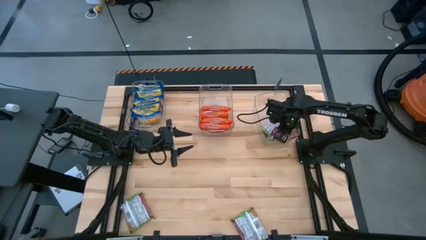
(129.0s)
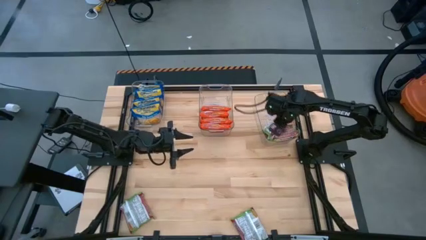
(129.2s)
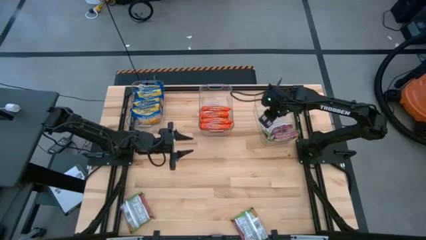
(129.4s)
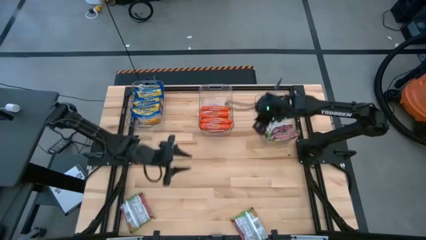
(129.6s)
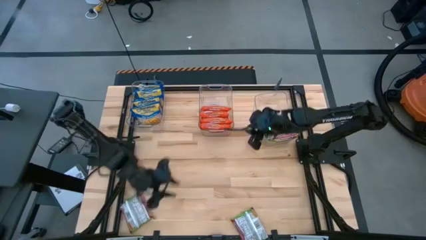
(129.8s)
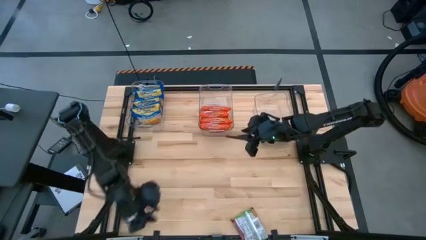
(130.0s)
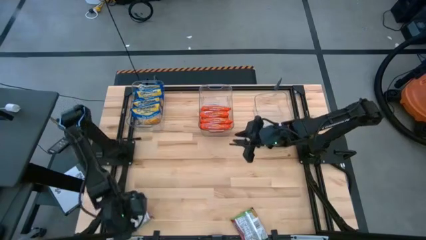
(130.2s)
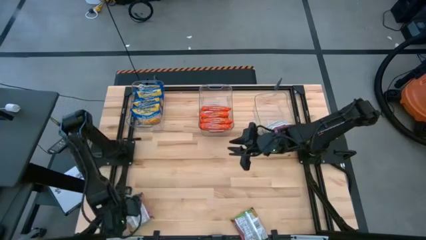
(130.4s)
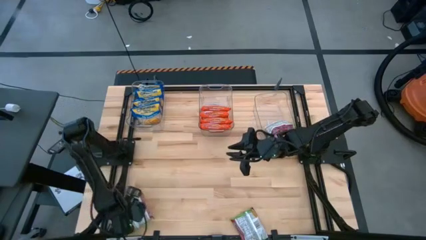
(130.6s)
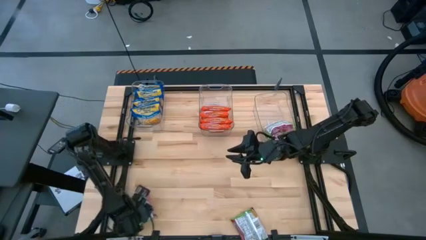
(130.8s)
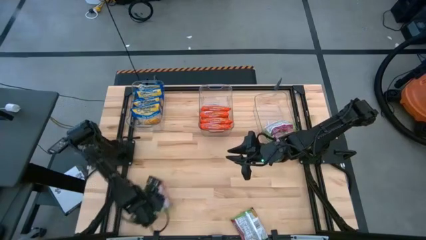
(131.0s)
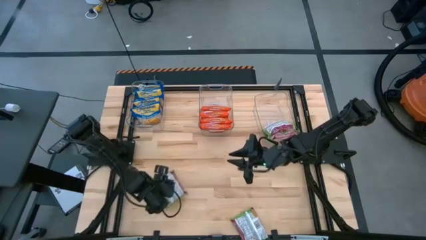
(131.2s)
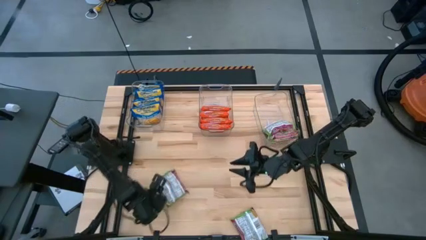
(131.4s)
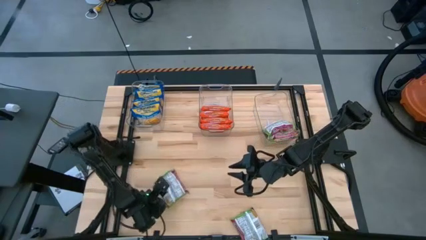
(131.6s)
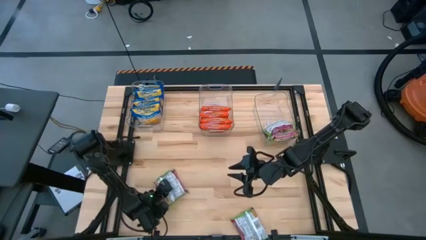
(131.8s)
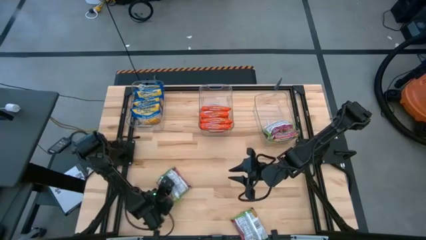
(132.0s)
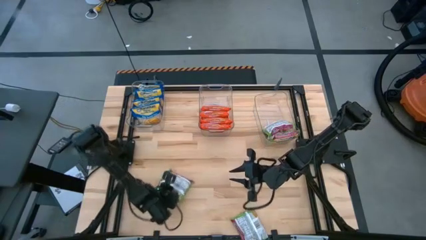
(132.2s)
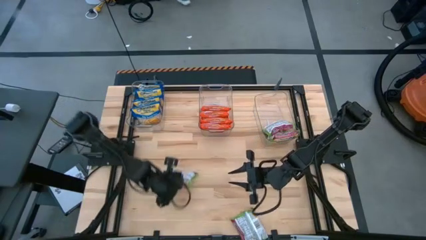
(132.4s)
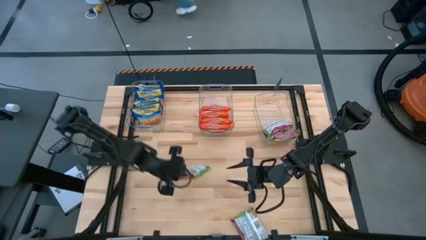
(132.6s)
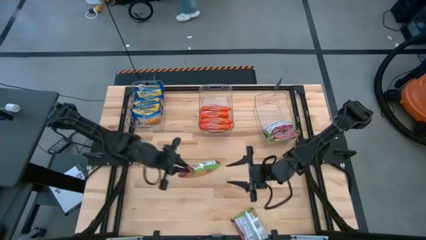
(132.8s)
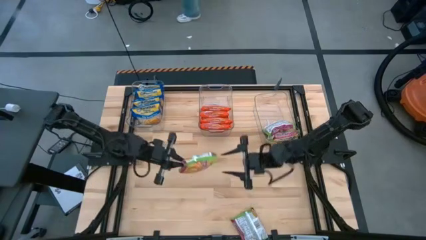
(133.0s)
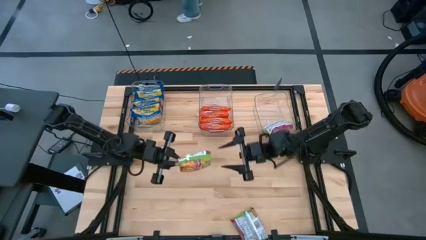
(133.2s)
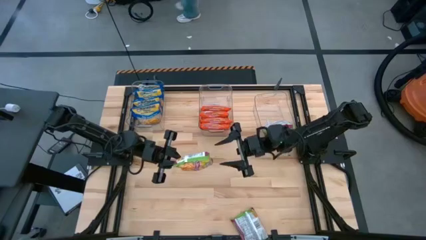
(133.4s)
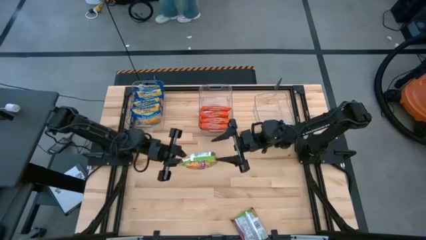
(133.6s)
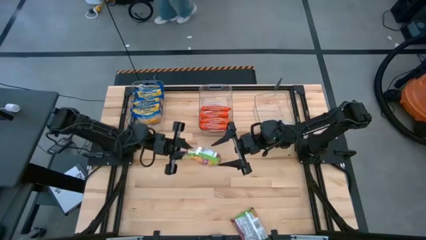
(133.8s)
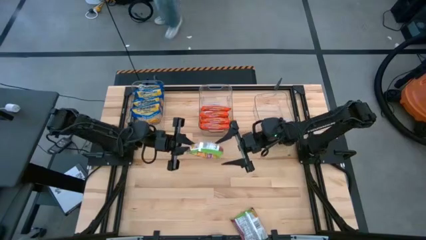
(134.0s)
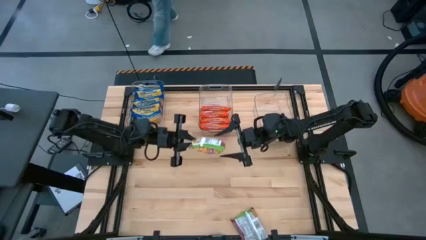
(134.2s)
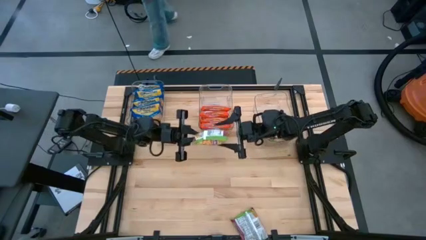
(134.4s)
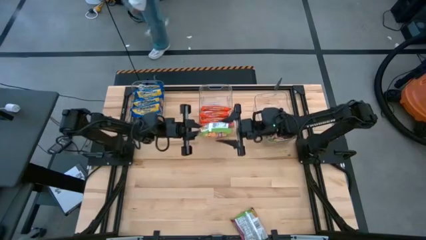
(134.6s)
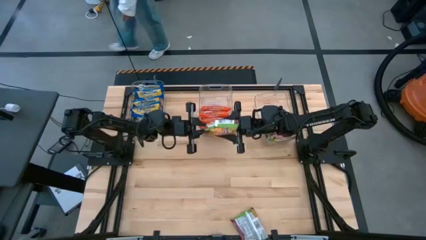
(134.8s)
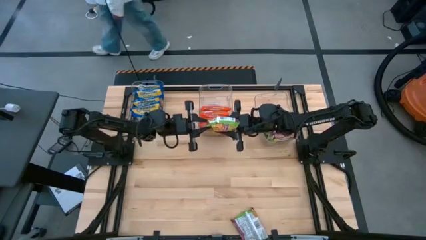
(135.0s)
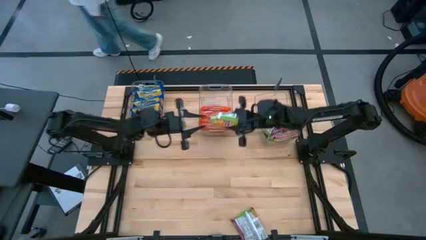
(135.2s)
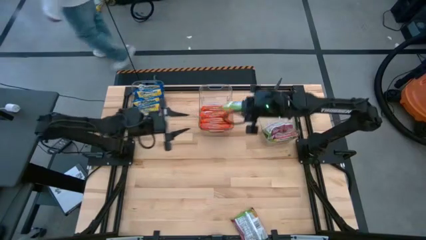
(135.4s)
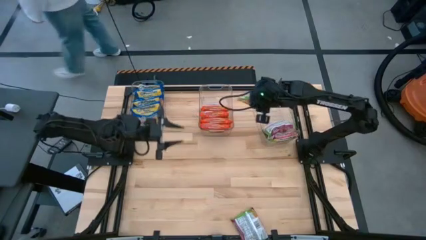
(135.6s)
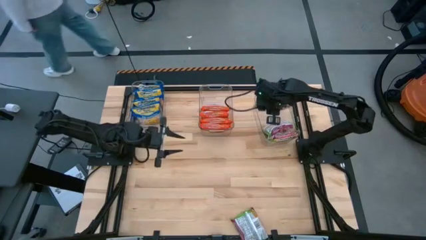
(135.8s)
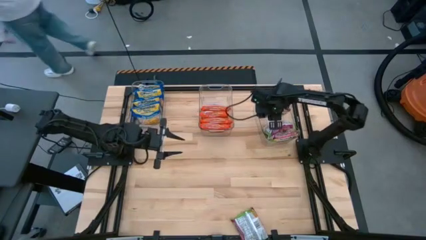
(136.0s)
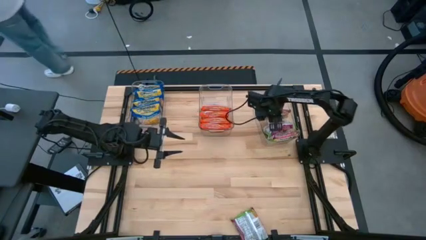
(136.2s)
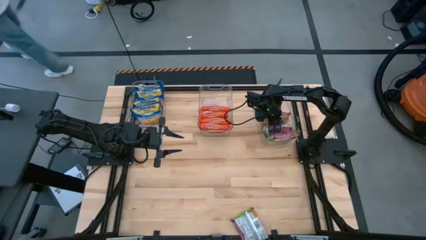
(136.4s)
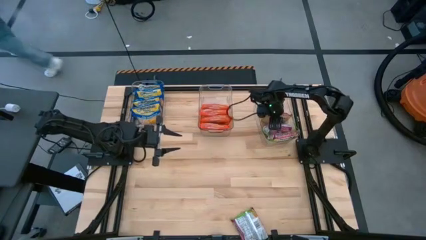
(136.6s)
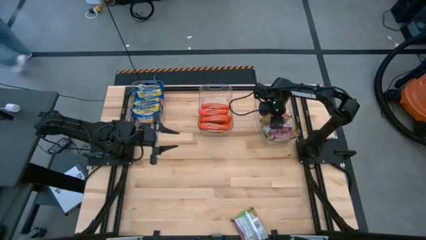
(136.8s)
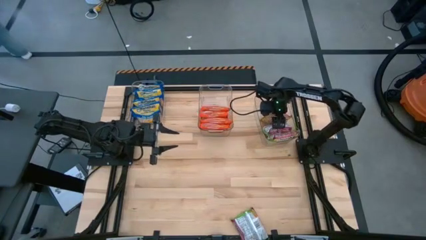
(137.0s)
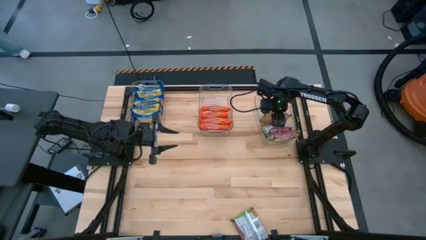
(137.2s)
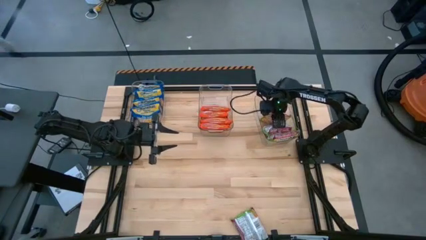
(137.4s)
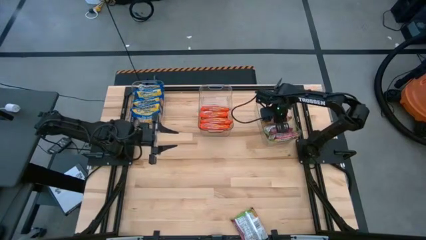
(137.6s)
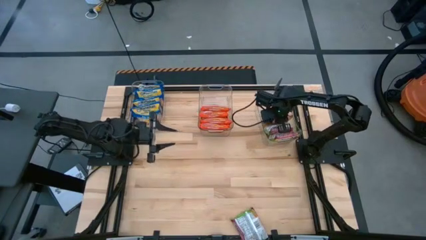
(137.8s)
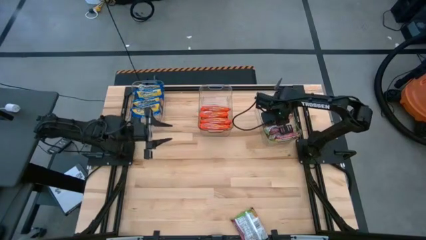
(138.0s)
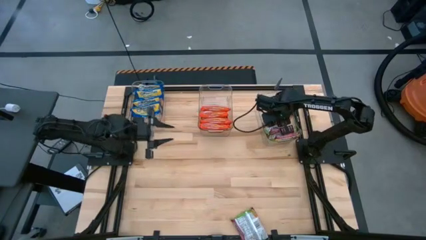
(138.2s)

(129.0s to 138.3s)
Task: Sort Maruchan noodles
Put the green noodle pack into the right transparent bin

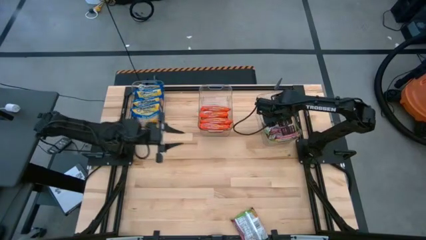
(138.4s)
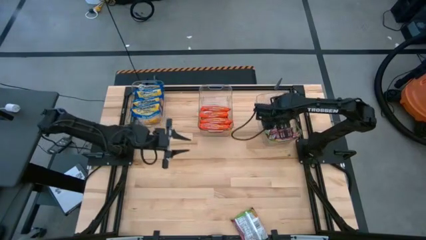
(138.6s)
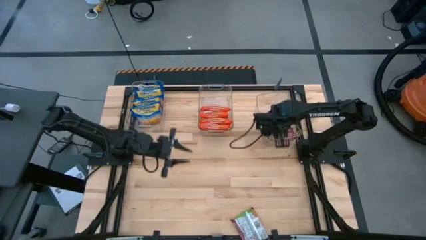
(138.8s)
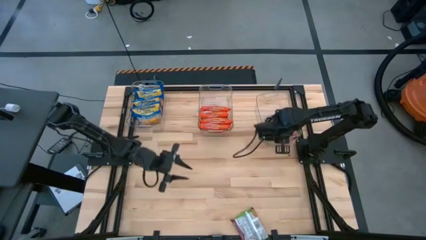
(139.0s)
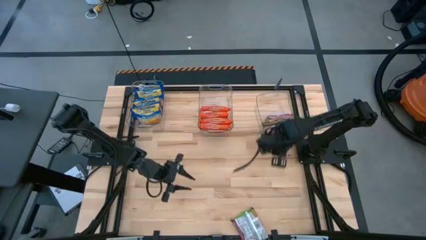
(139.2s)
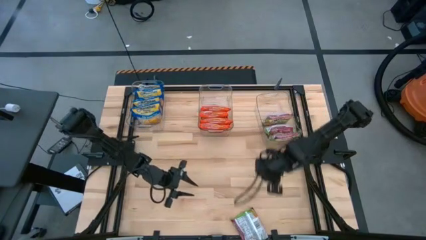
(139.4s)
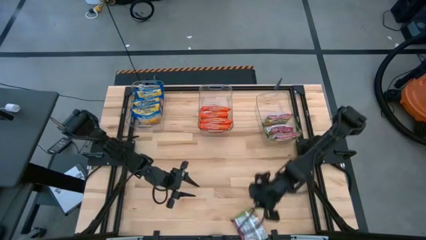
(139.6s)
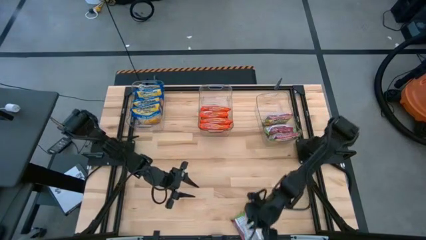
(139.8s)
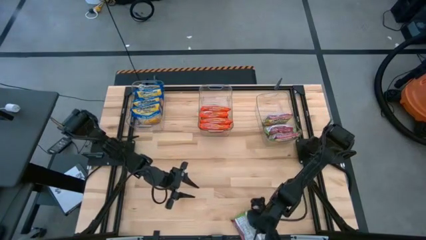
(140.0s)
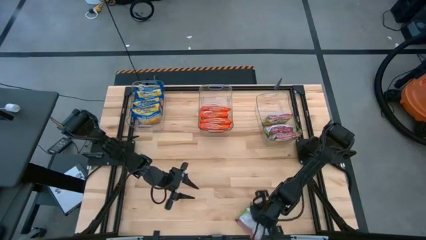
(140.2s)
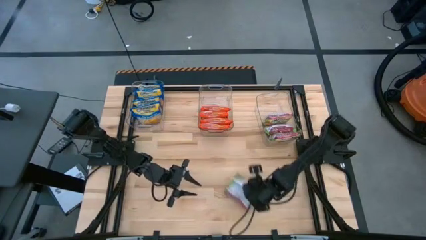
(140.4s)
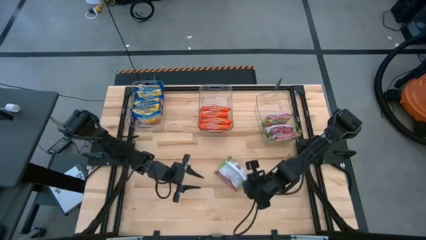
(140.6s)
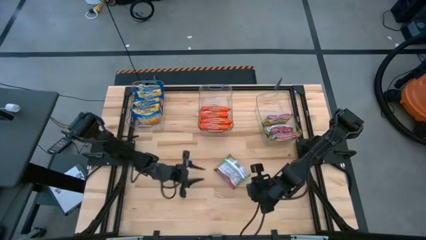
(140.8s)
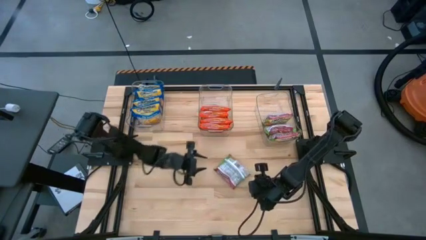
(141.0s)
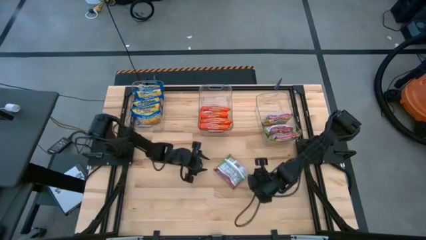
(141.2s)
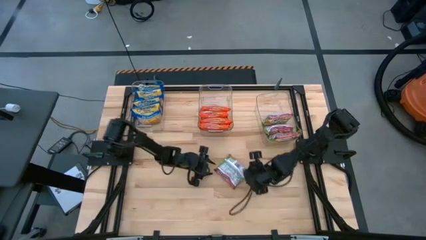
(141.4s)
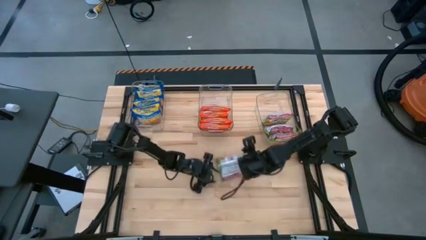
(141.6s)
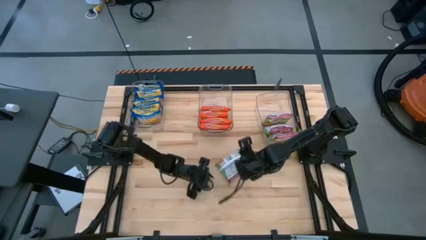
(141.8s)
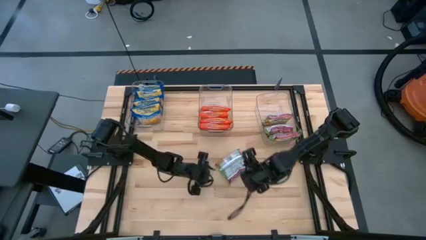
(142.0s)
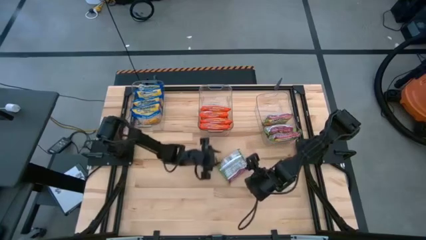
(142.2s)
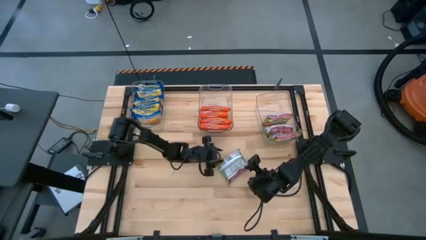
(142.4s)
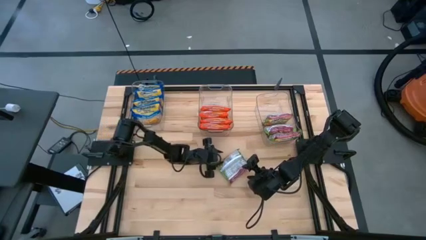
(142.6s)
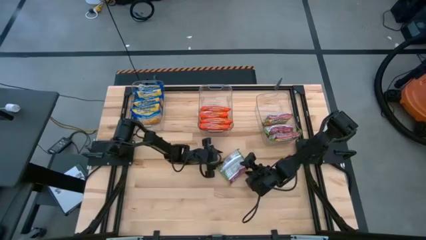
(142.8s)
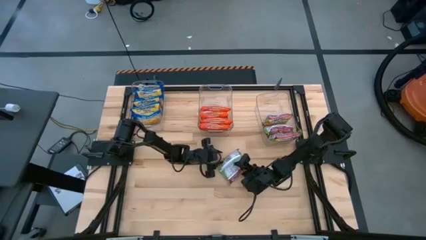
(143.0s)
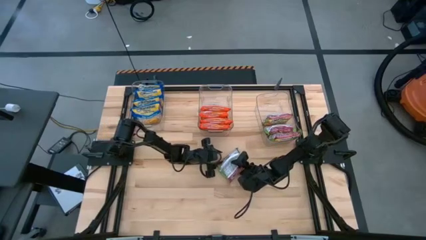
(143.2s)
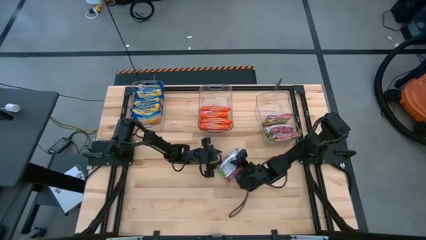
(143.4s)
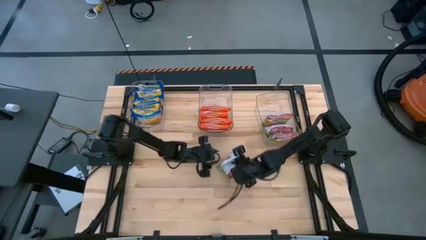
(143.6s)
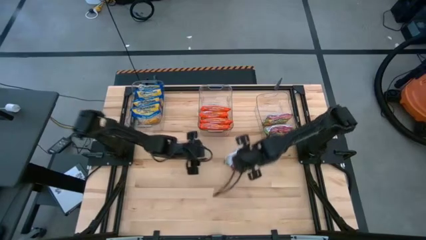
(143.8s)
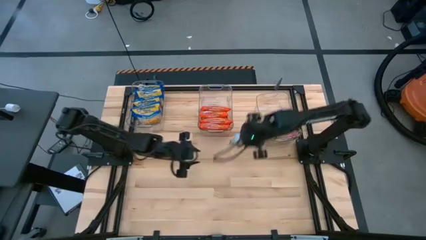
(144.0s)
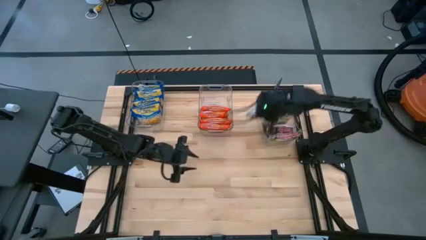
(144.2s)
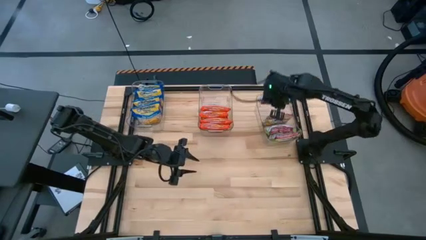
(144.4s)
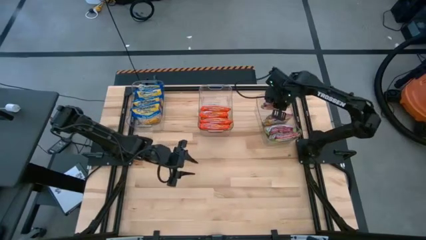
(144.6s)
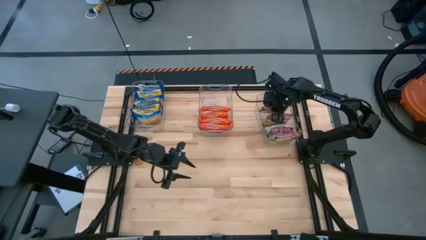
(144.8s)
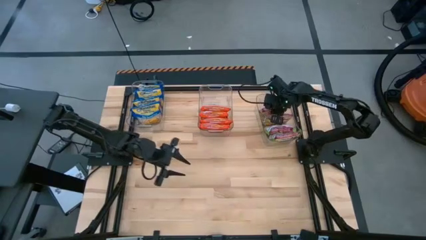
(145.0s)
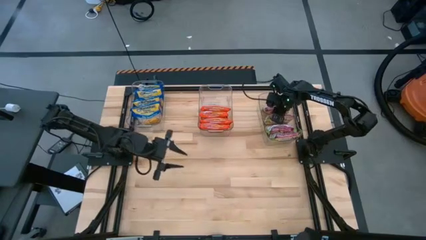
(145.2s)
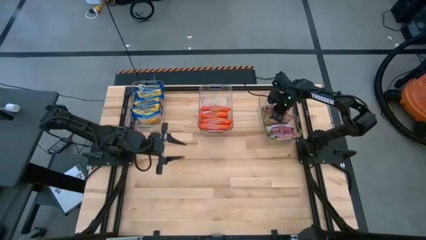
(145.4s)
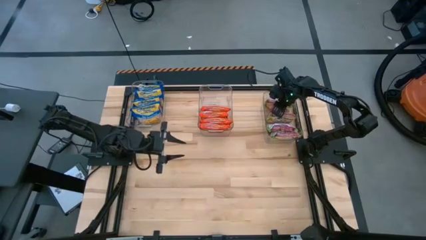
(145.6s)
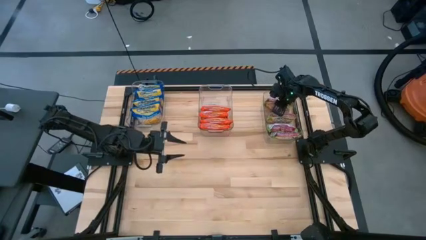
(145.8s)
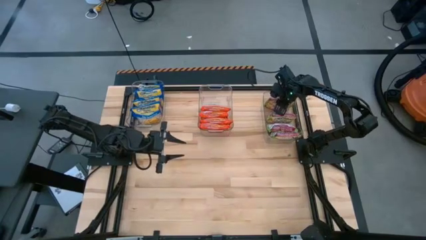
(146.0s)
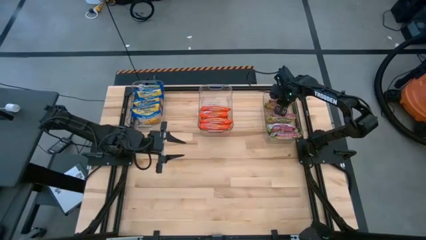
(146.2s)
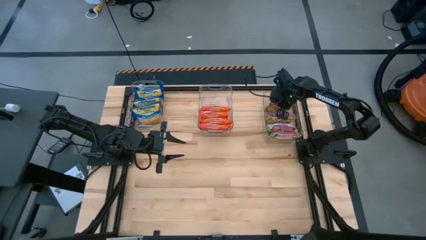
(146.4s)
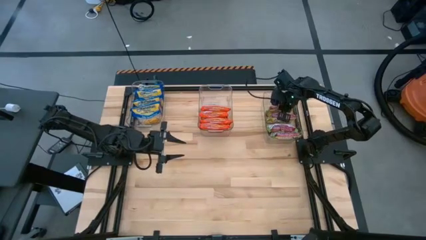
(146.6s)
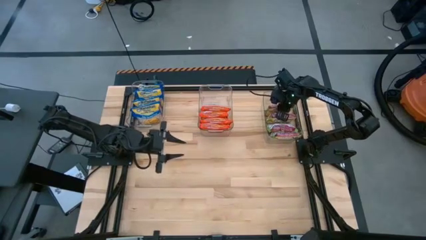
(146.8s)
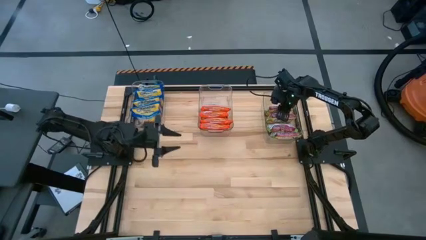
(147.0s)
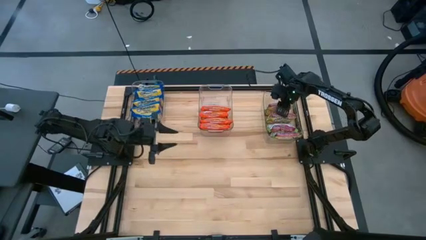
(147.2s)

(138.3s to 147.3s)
Put the green noodle pack into the right transparent bin
